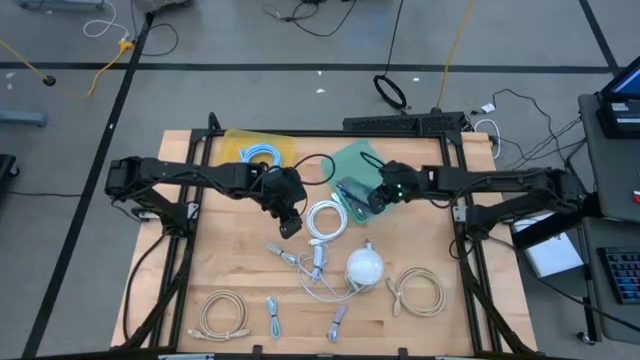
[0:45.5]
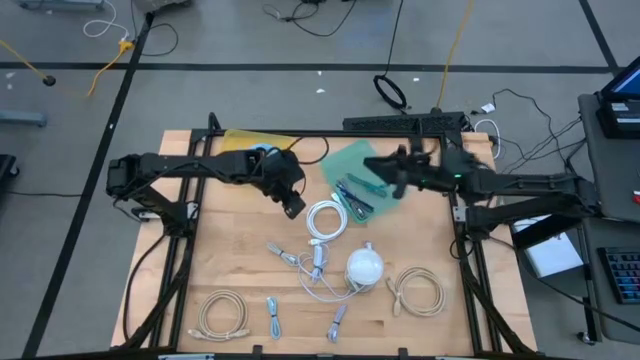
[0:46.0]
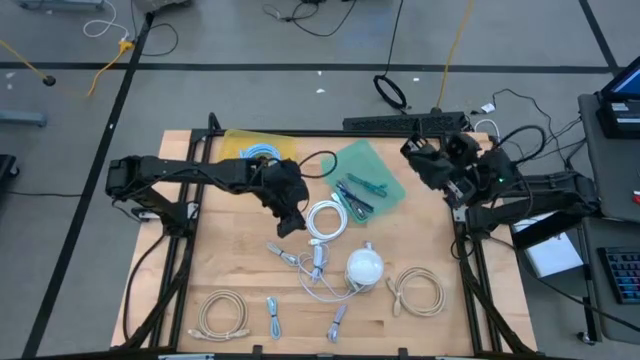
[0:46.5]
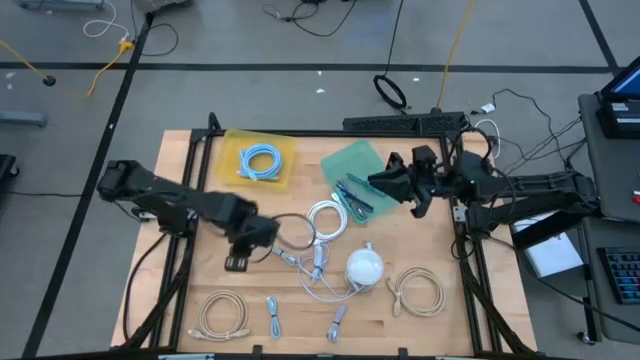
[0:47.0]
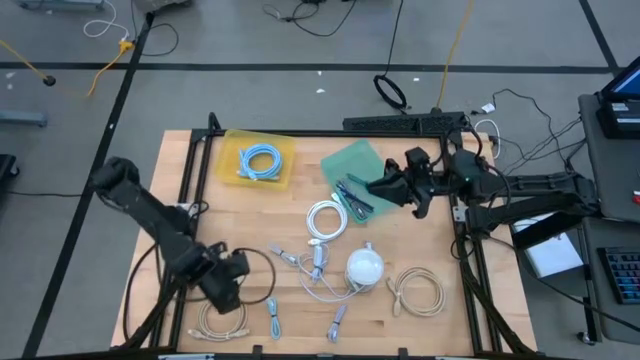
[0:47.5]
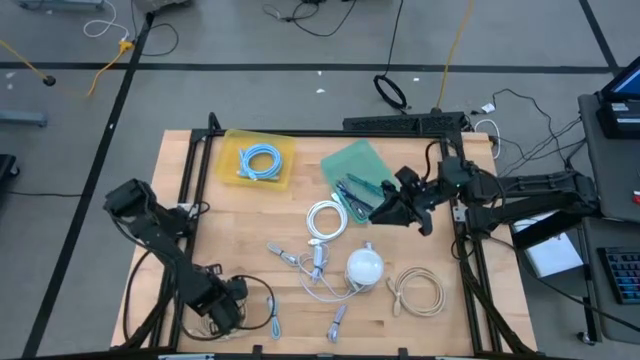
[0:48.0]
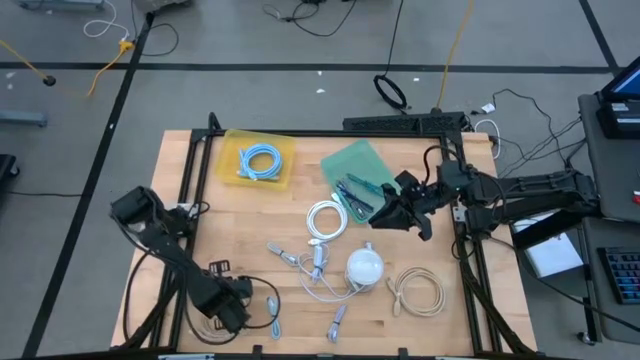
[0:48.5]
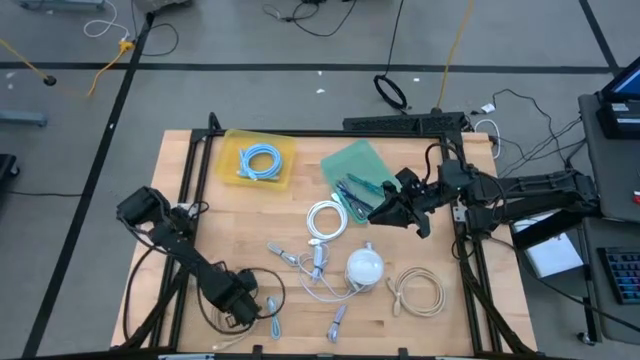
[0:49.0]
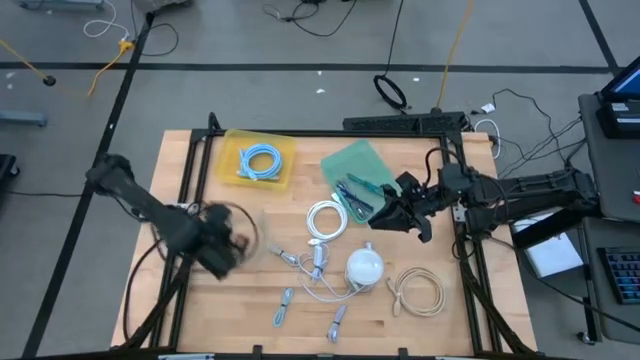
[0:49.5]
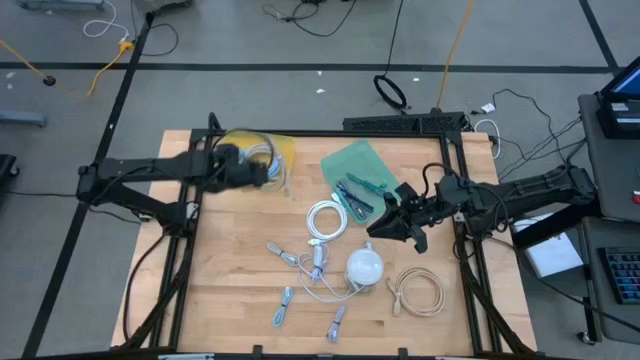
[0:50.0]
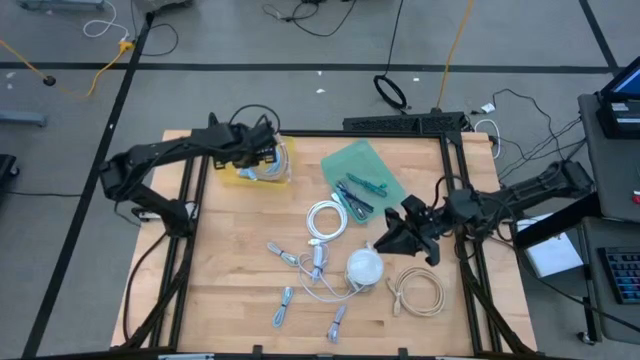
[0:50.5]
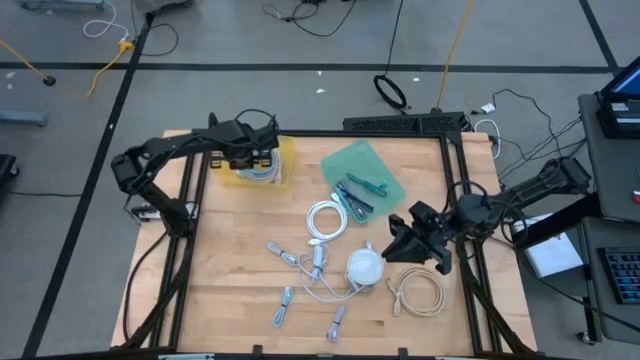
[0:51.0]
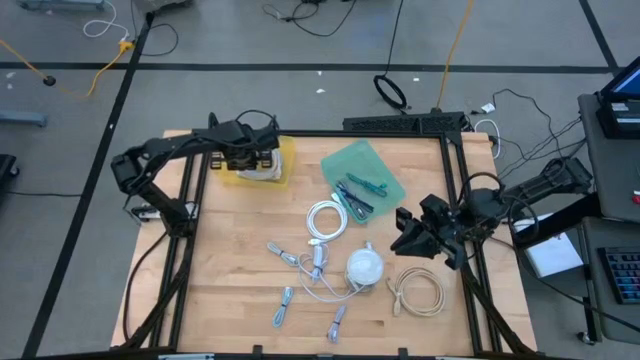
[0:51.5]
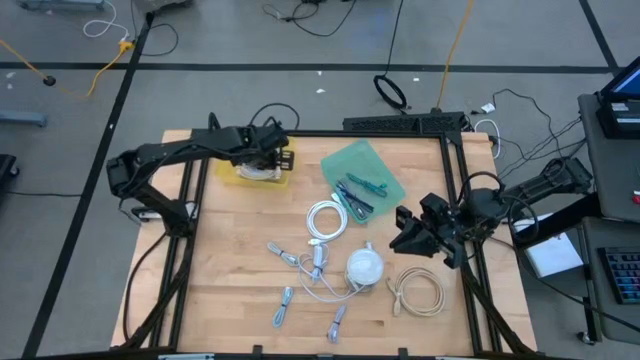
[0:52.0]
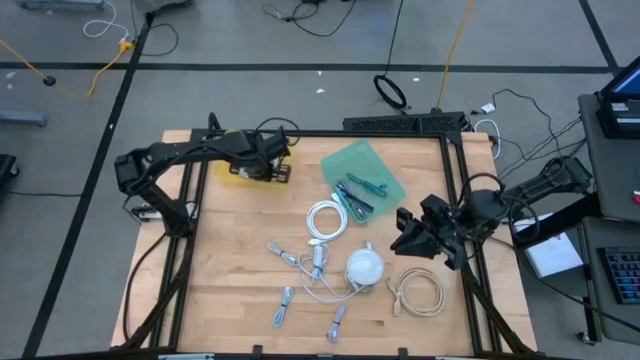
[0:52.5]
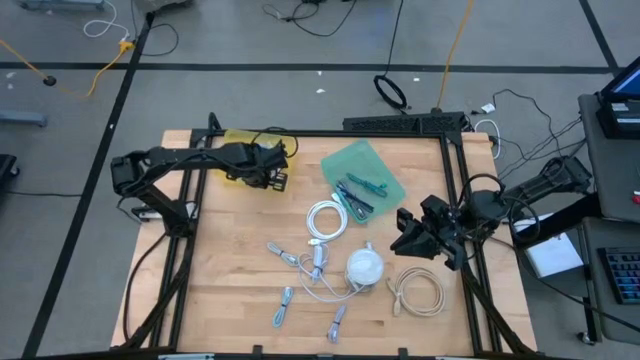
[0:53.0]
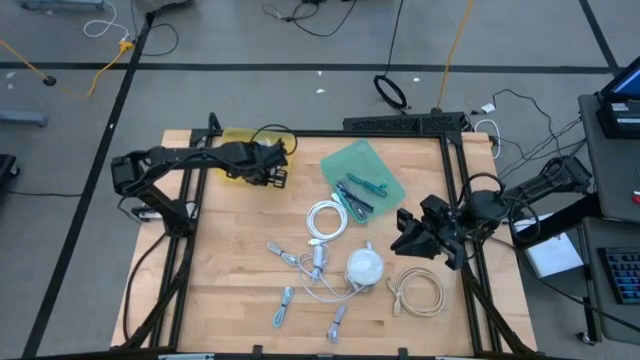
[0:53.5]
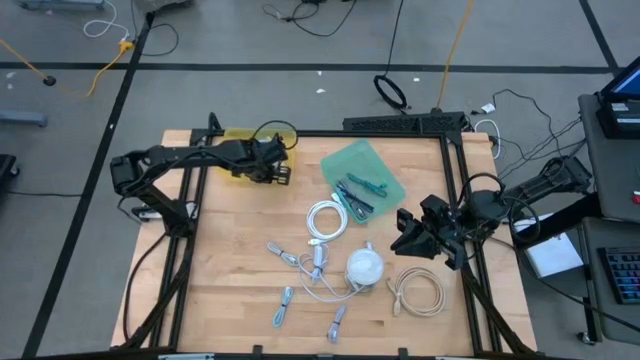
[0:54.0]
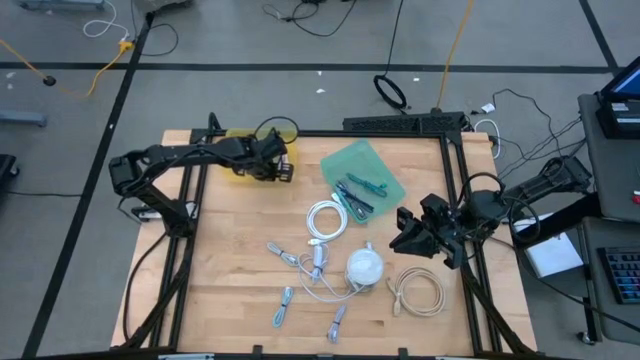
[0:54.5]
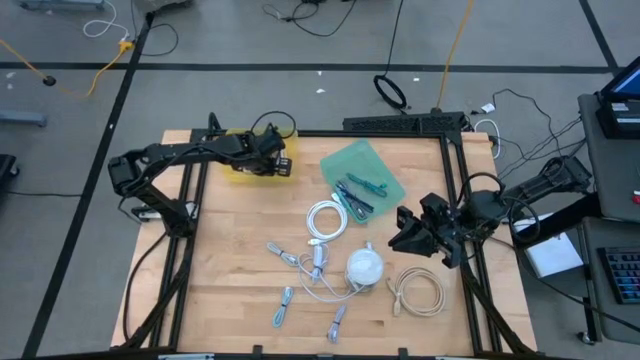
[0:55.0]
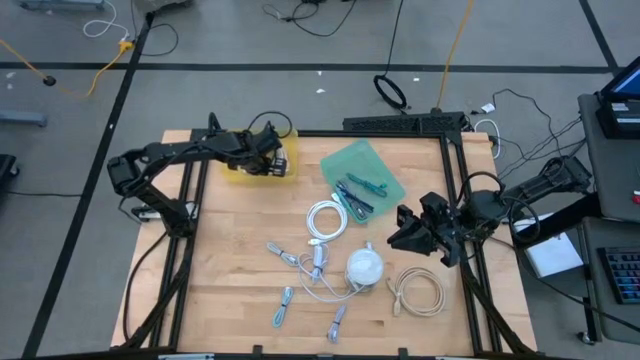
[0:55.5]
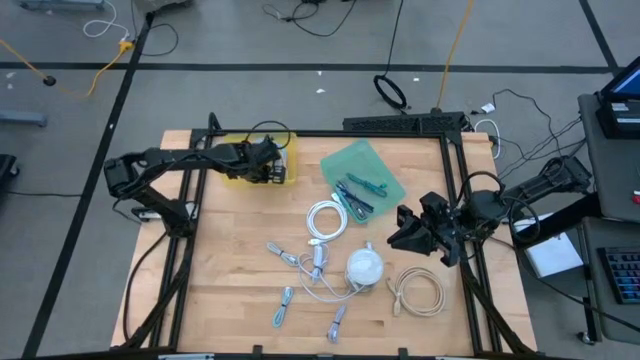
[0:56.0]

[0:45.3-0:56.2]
Task: Pick & Place USB Port
Put the left brown HDMI cable into the yellow bin

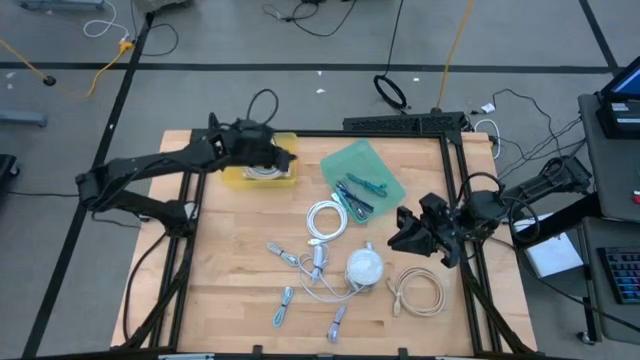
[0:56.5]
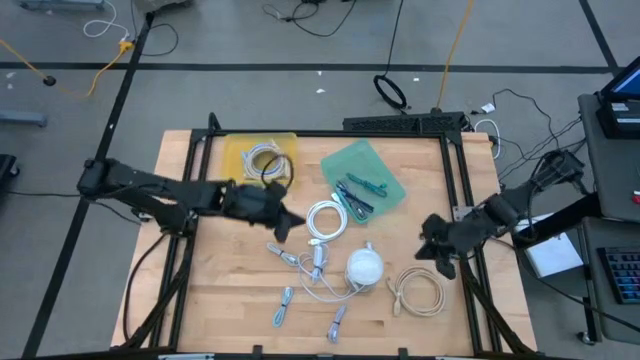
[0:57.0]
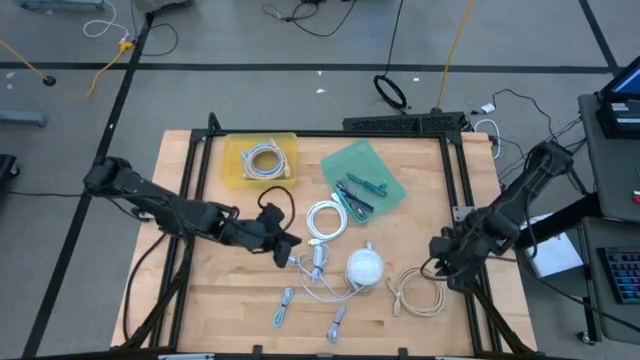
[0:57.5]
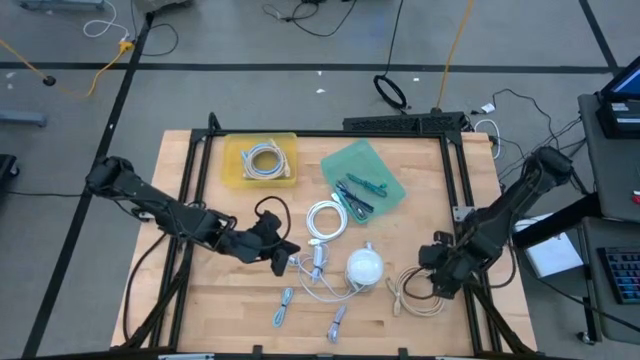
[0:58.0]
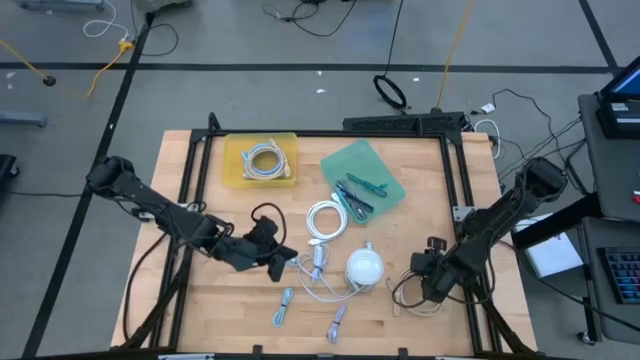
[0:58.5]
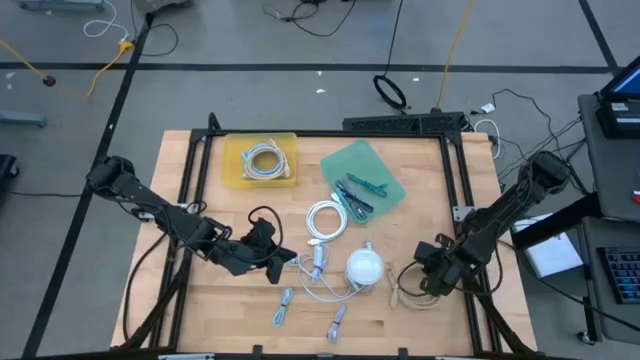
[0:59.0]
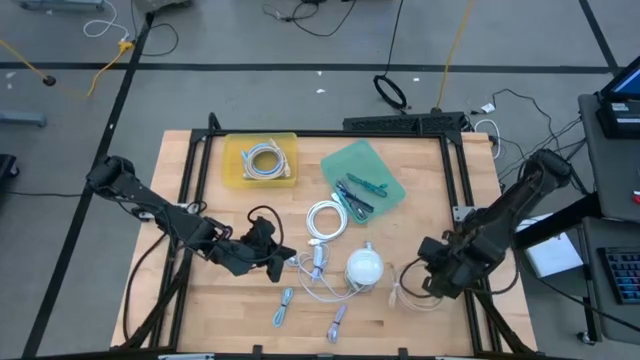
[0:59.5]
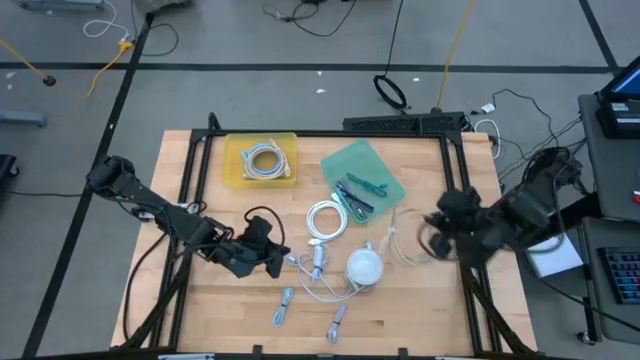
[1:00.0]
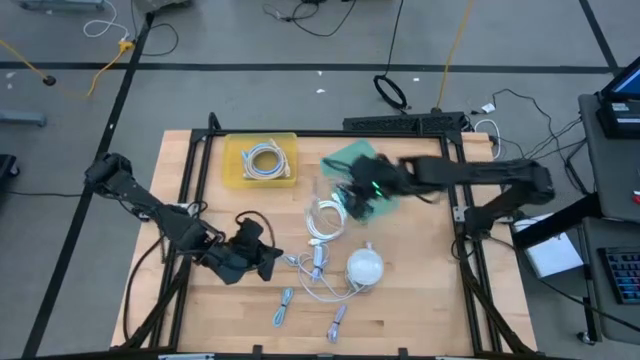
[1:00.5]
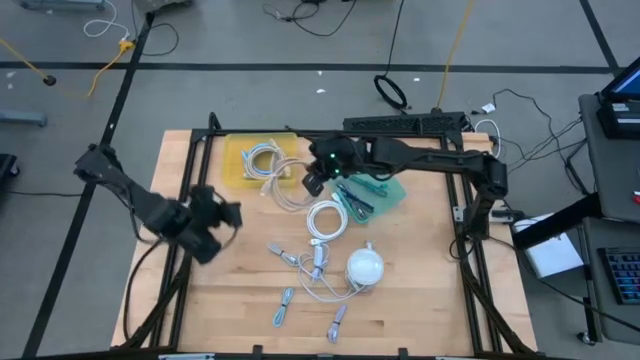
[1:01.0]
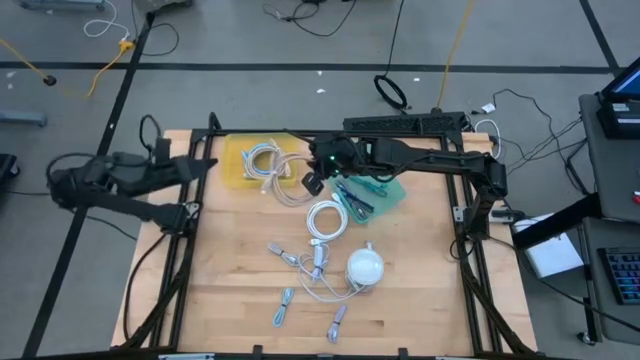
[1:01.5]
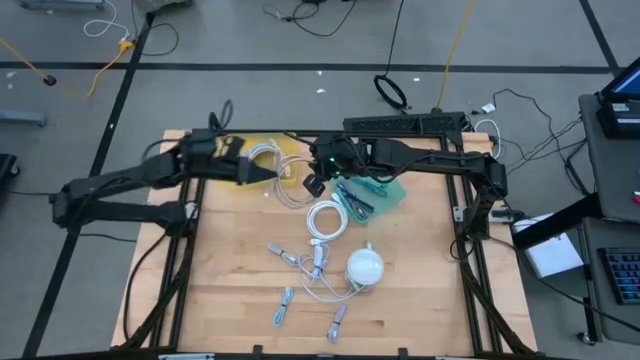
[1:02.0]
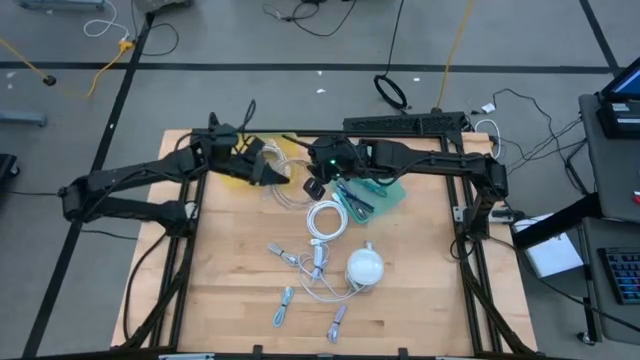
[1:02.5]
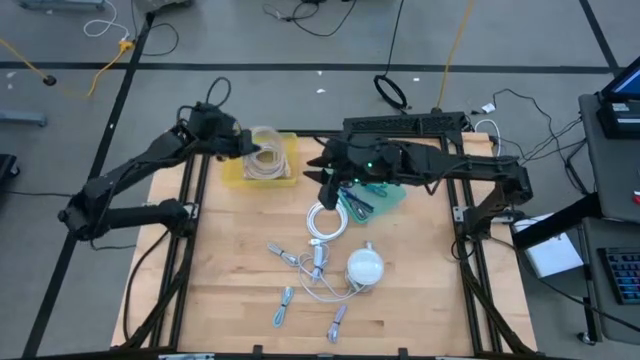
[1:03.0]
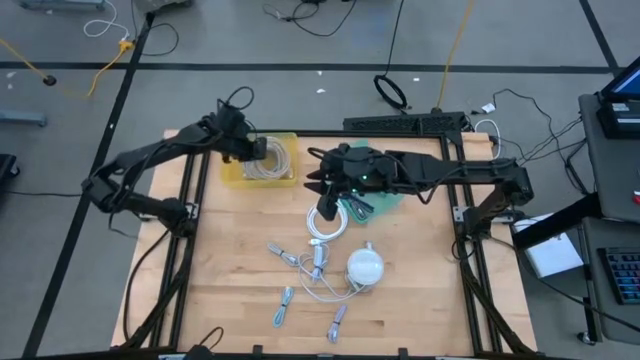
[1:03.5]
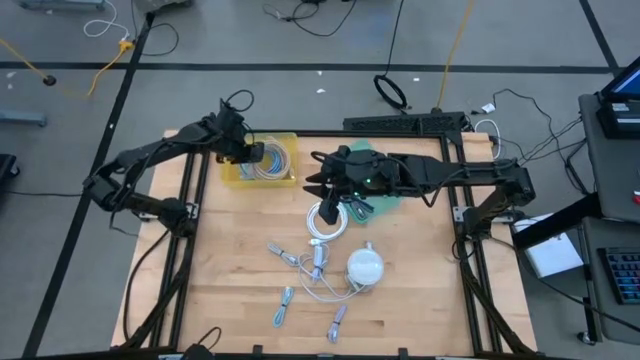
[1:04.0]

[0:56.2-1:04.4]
Put the brown HDMI cable into the yellow bin

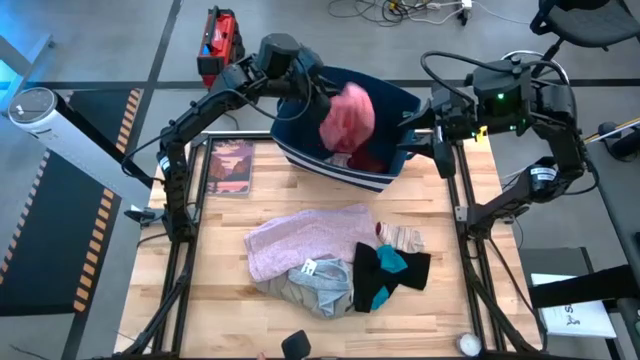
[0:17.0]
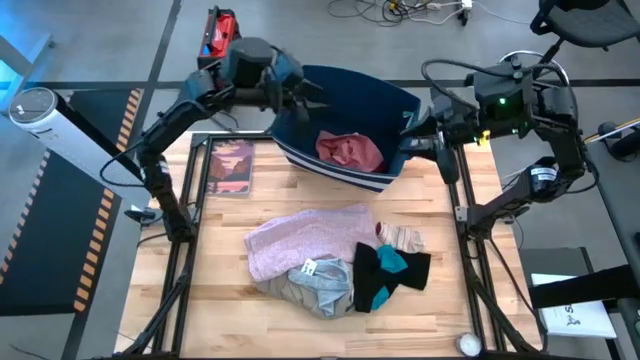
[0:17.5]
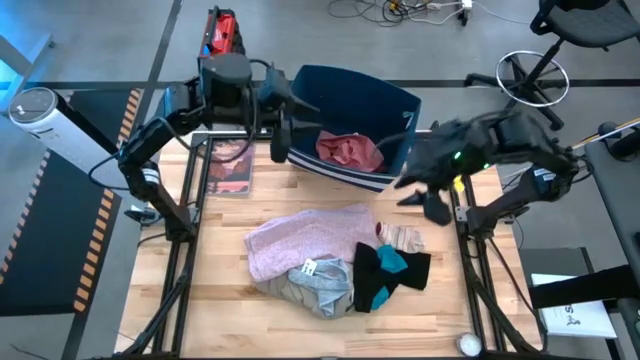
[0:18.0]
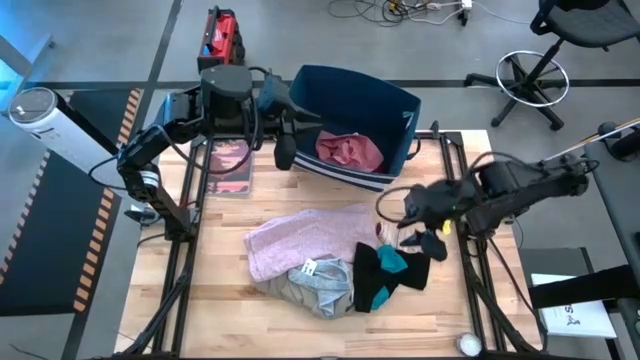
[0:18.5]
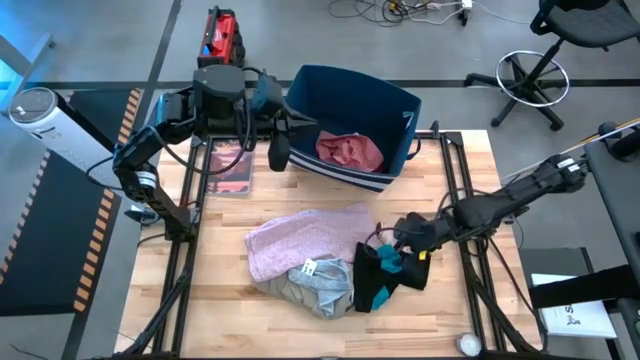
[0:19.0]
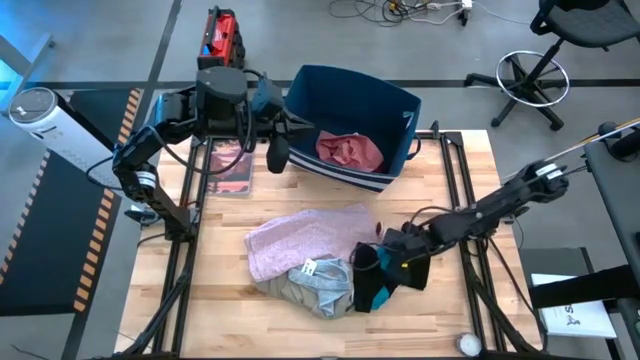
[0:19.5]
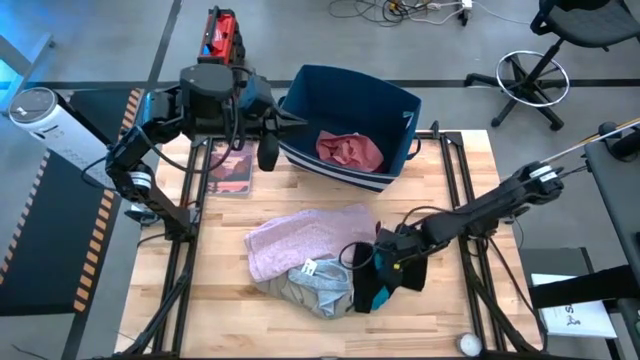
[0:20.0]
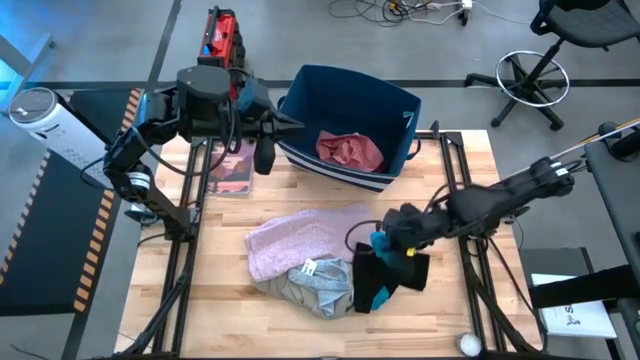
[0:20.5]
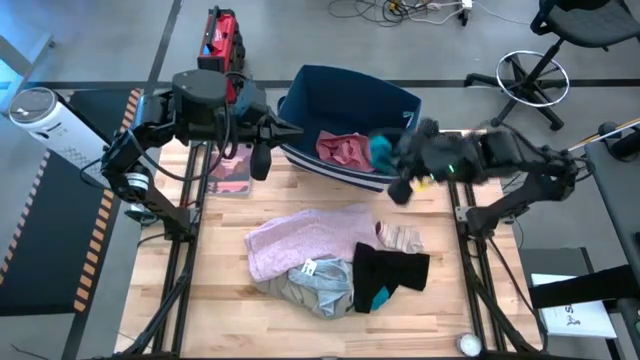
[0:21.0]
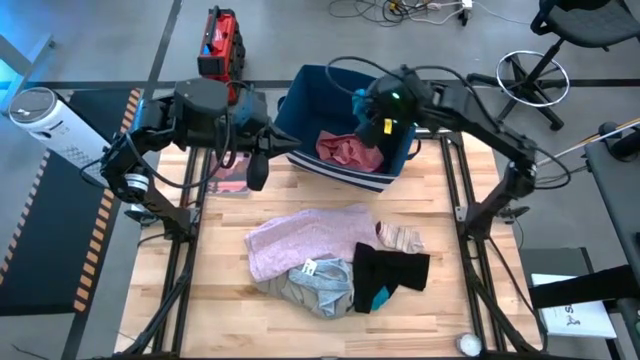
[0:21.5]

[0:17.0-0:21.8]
Task: Sort clothes
Put the blue sock into the blue laundry bin
